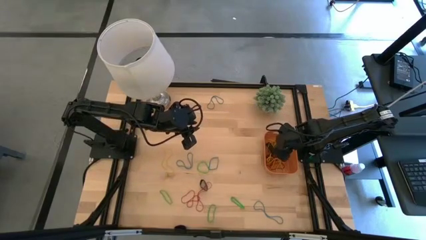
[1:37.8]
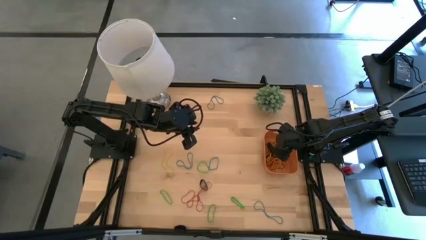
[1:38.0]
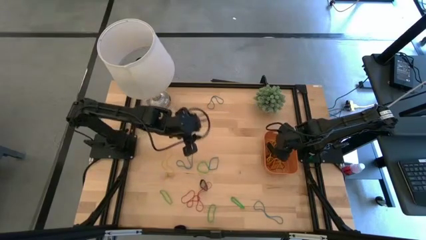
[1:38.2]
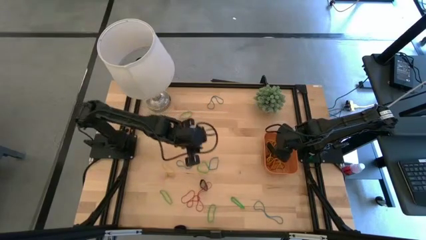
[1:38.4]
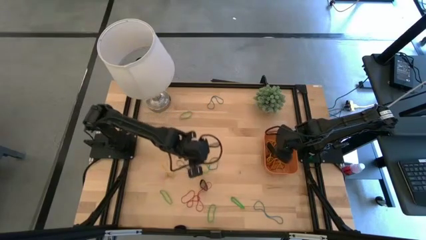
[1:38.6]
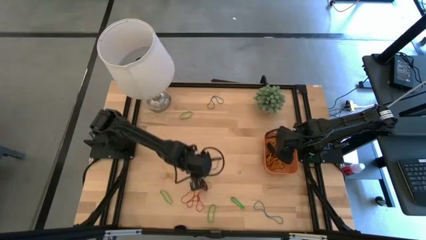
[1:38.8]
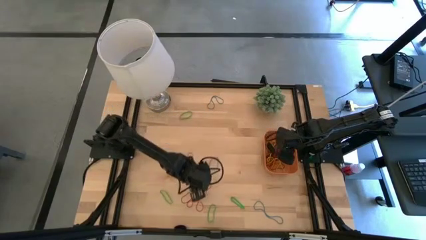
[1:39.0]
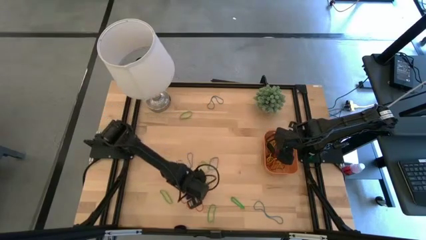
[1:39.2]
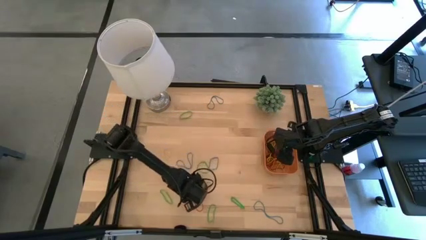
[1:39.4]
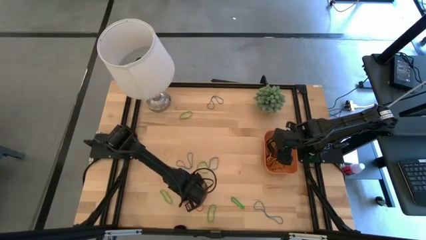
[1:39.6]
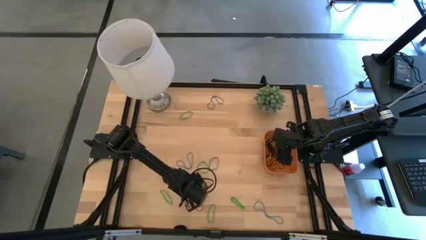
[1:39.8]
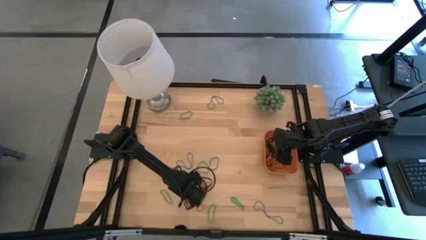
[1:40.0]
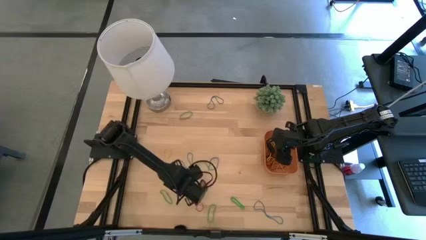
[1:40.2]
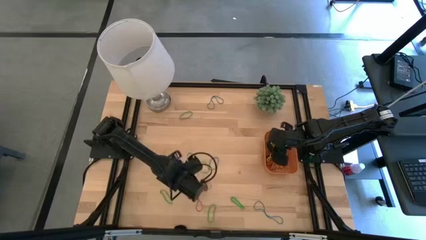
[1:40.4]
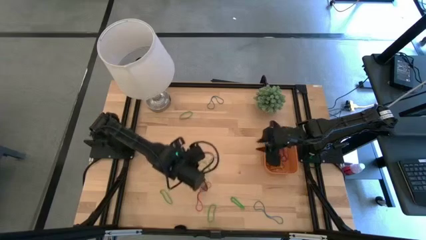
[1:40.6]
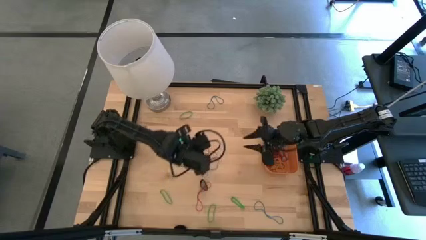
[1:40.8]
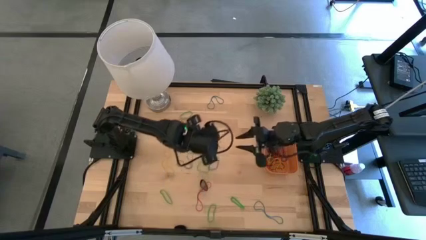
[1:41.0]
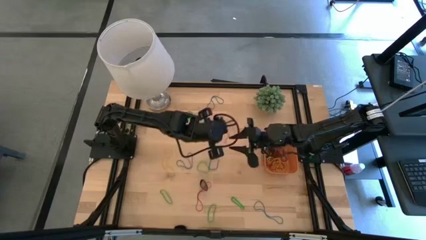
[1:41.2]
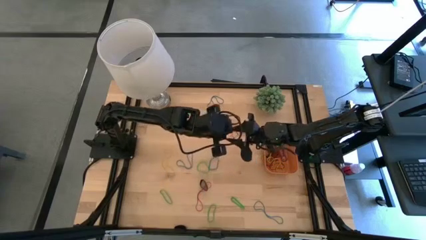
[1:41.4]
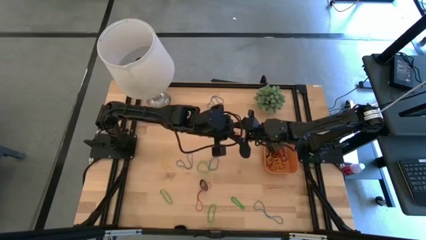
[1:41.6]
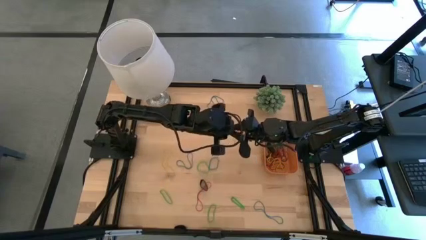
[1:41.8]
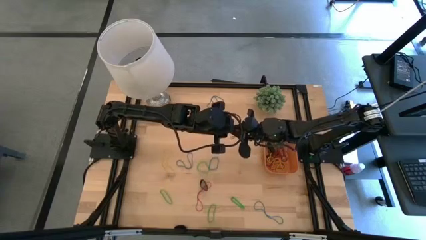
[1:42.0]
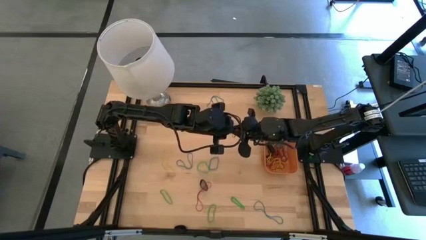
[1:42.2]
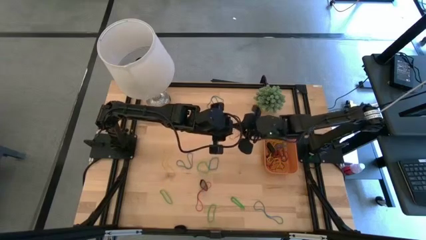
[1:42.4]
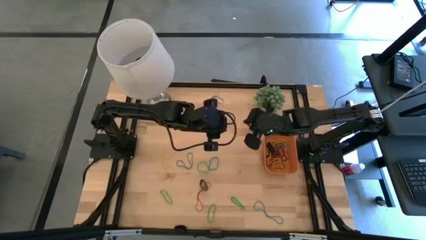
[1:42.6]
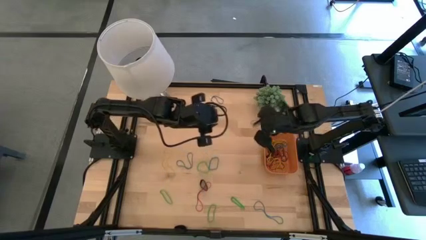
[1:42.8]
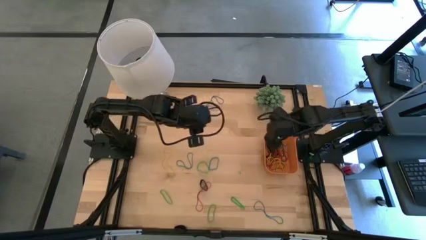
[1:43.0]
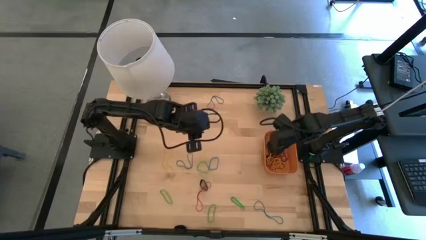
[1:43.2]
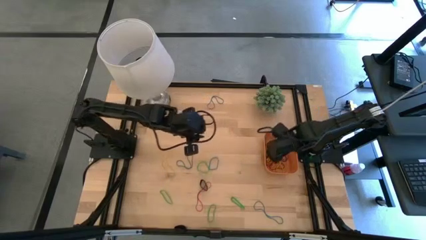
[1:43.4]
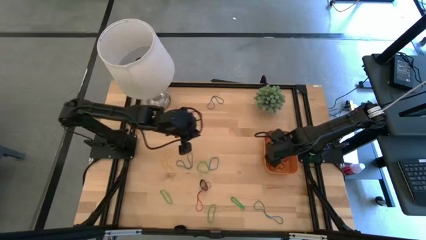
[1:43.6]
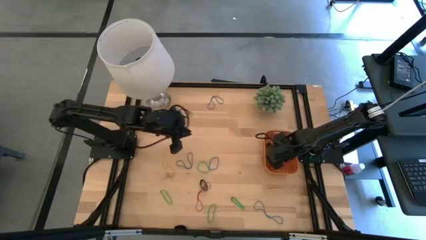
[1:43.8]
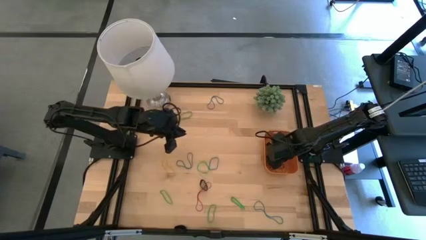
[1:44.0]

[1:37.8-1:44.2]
Task: Pick and place rubber bands into bin
Put the red rubber band into the orange bin

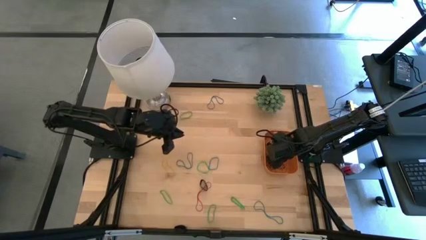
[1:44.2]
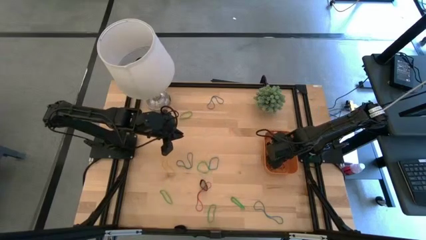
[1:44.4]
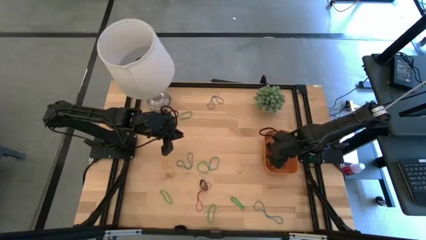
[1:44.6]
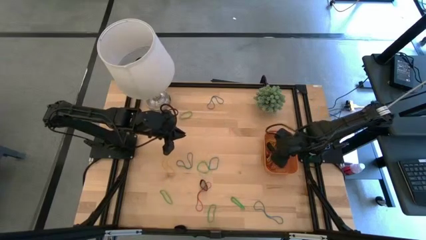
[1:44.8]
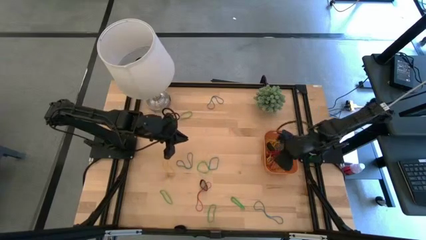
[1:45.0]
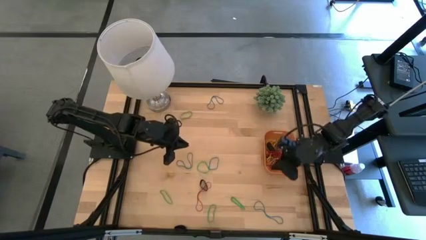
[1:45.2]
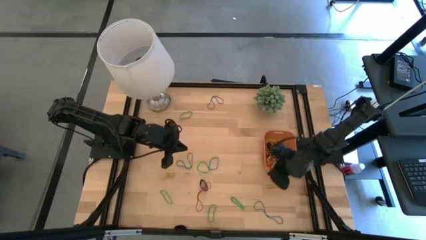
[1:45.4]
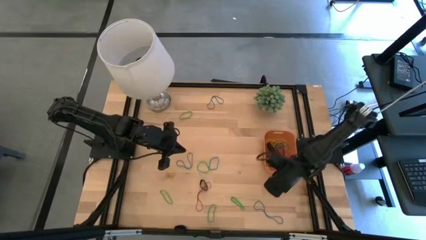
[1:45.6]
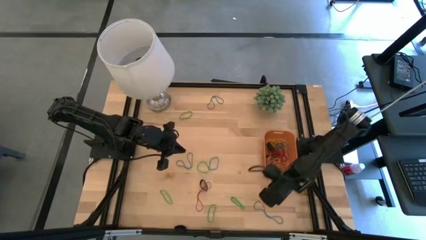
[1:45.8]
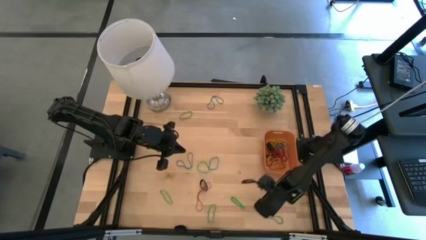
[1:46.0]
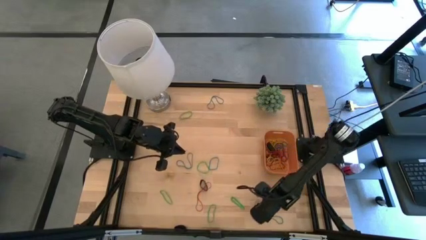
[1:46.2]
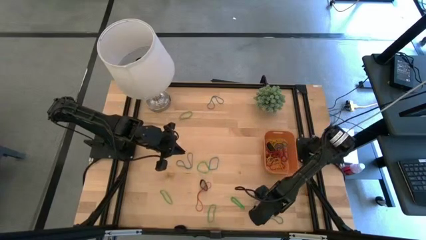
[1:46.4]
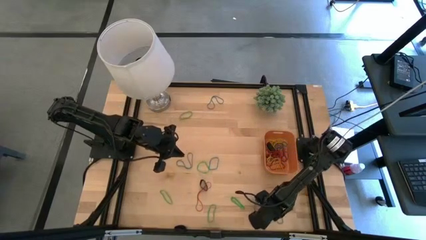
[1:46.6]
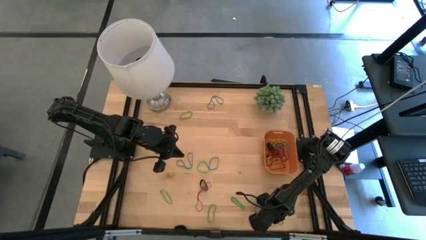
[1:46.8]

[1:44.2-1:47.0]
Put the blue rubber band into the orange bin

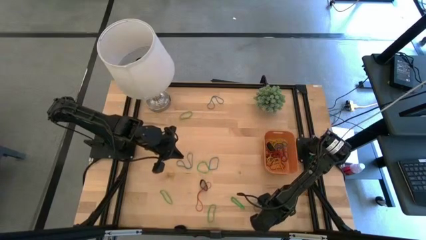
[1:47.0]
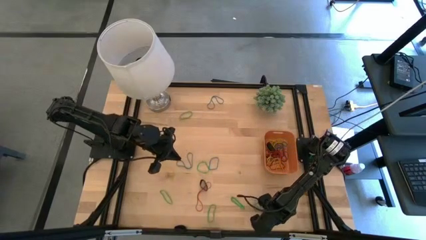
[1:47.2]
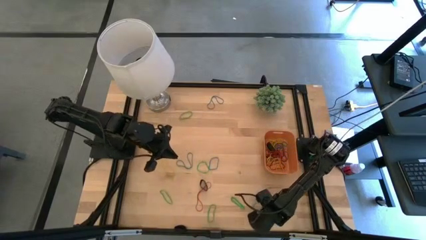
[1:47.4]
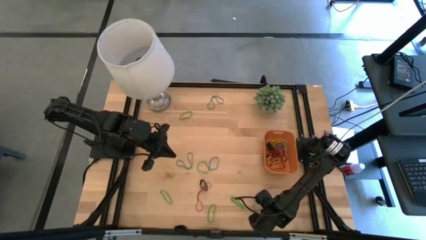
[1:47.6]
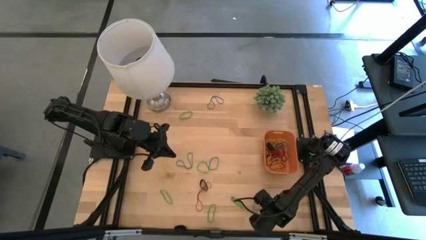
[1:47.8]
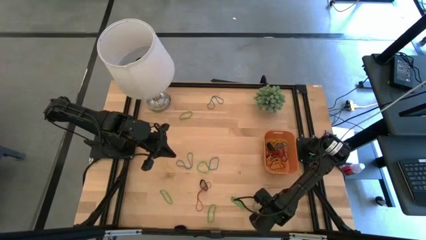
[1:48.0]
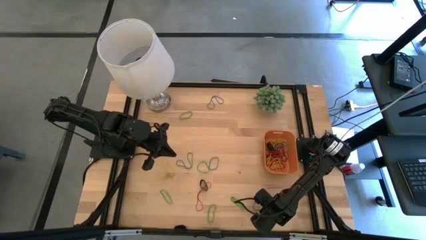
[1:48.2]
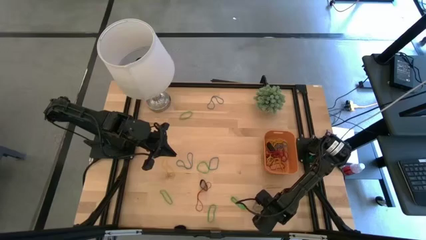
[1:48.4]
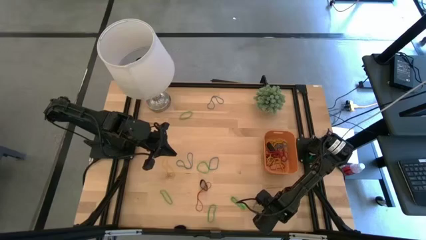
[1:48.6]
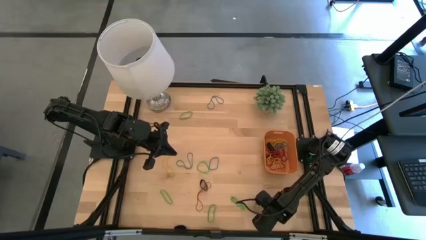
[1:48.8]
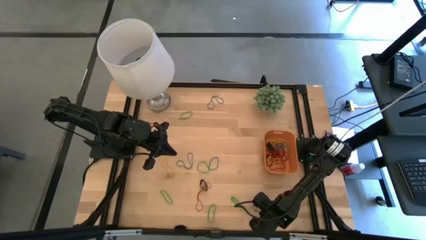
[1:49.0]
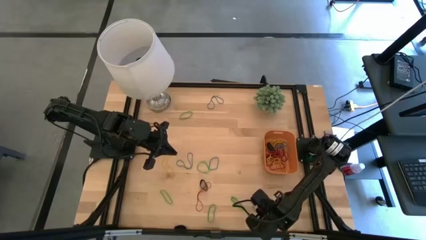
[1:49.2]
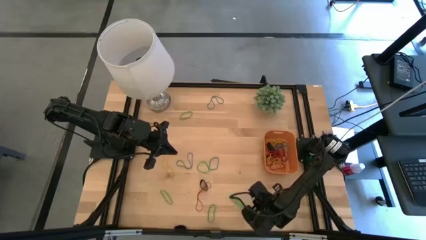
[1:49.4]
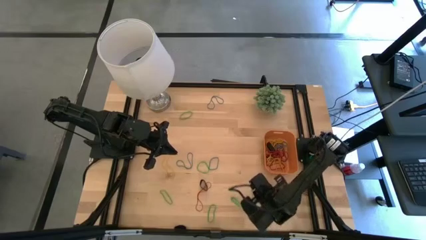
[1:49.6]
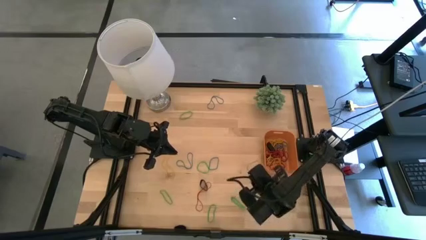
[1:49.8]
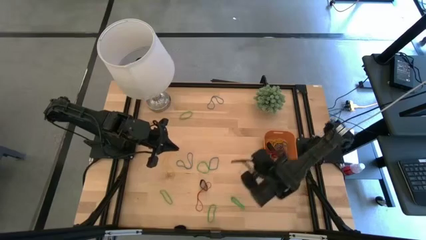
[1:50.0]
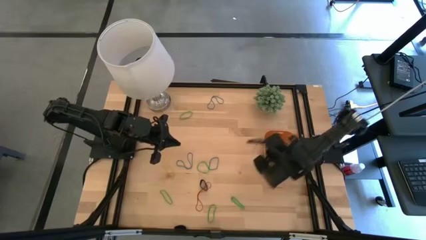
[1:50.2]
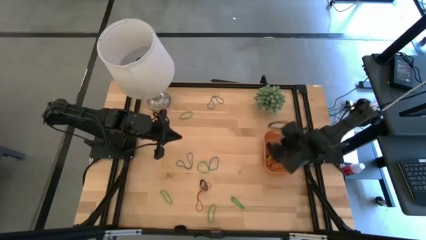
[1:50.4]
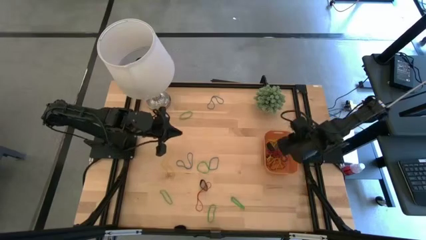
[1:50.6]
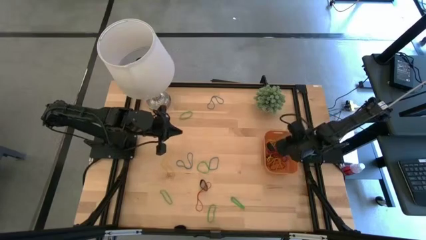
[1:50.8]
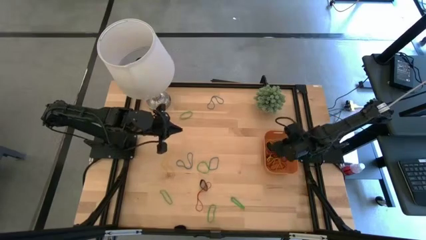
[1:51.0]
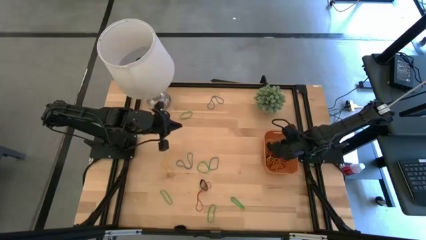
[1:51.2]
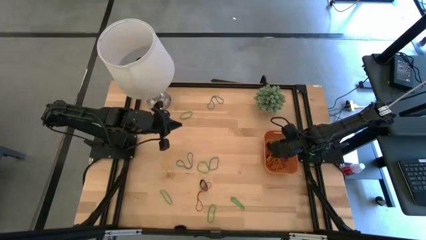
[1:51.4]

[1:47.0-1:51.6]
Put the blue rubber band into the orange bin

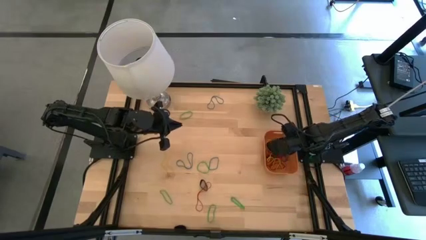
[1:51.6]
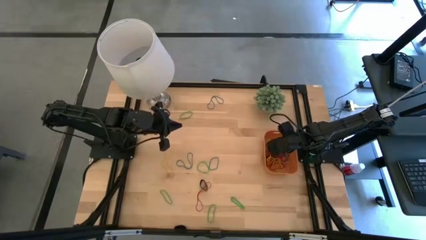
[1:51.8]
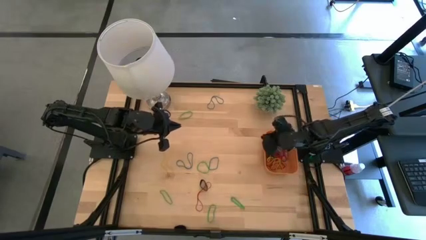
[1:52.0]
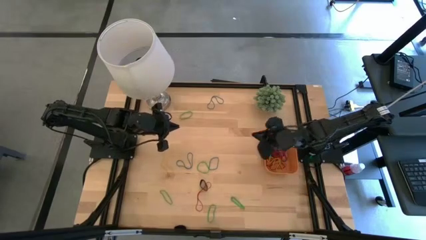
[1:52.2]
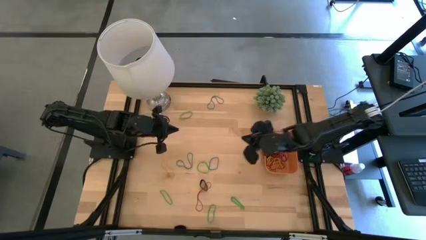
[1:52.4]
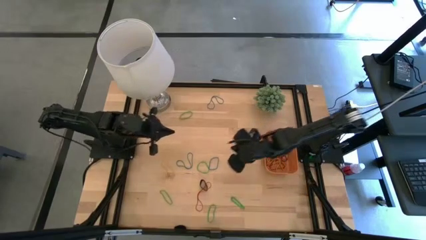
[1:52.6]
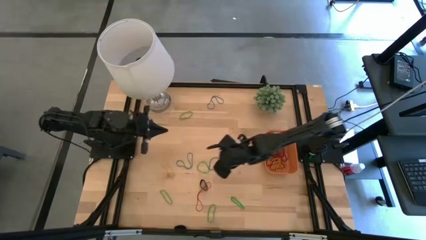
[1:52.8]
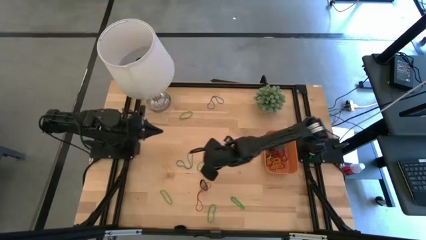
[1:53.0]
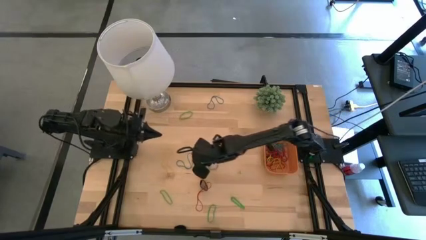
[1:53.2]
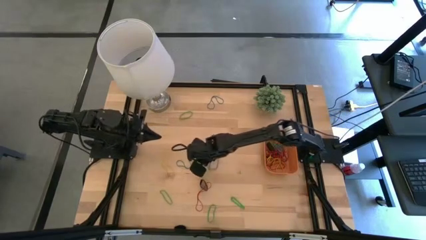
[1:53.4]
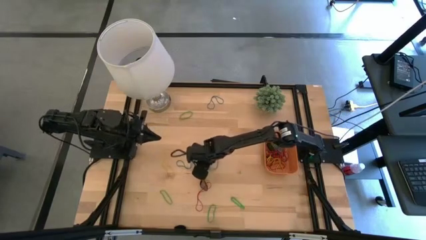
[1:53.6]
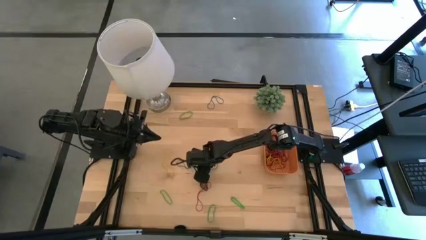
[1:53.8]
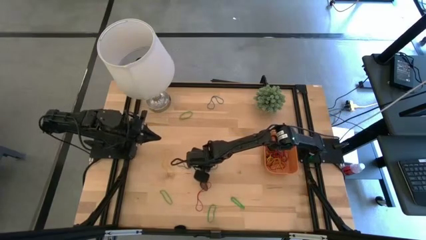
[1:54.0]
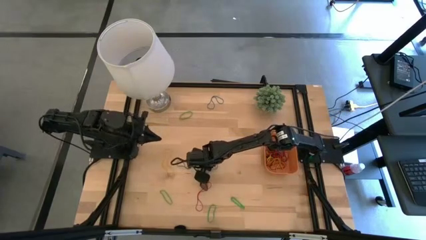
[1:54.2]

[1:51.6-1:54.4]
Put the green rubber band into the orange bin
